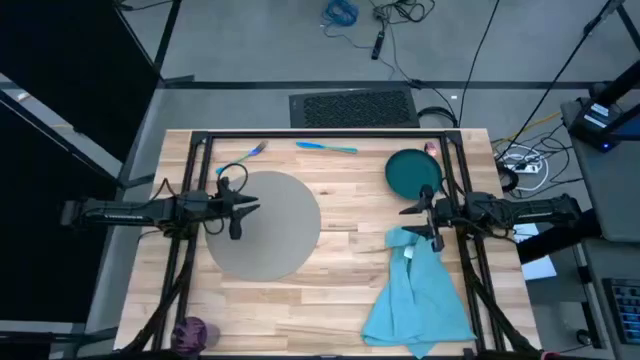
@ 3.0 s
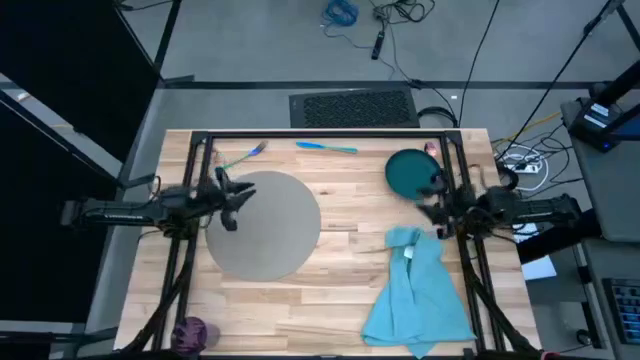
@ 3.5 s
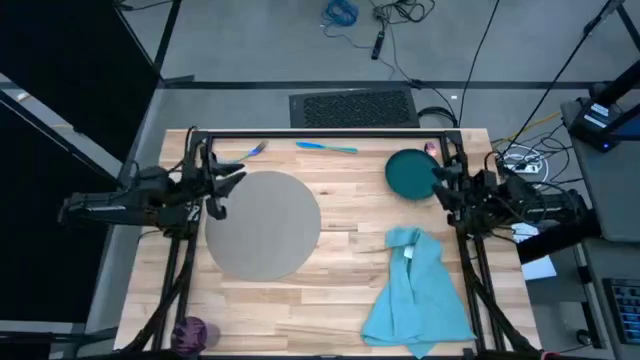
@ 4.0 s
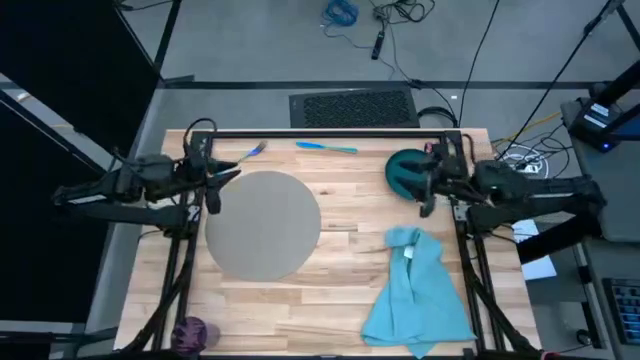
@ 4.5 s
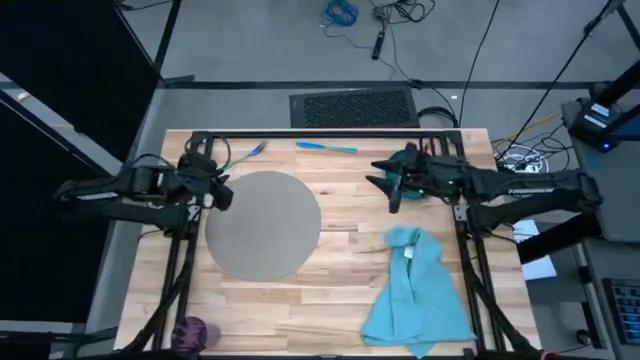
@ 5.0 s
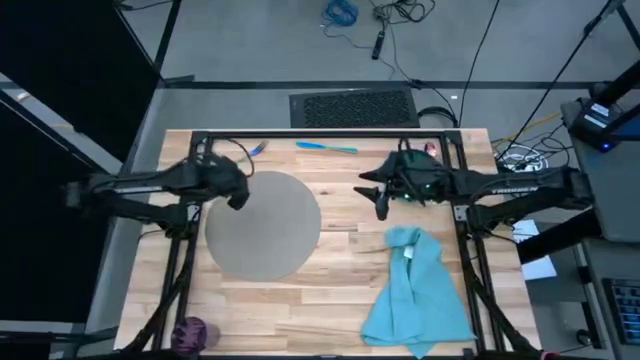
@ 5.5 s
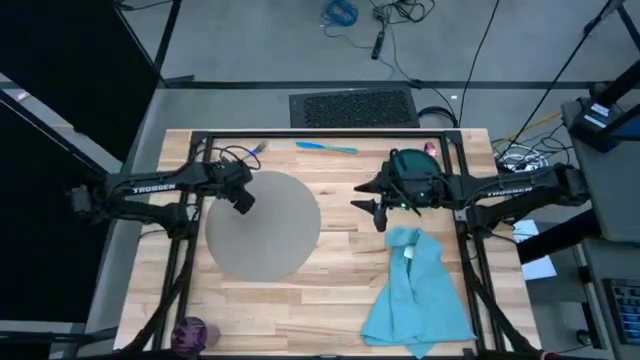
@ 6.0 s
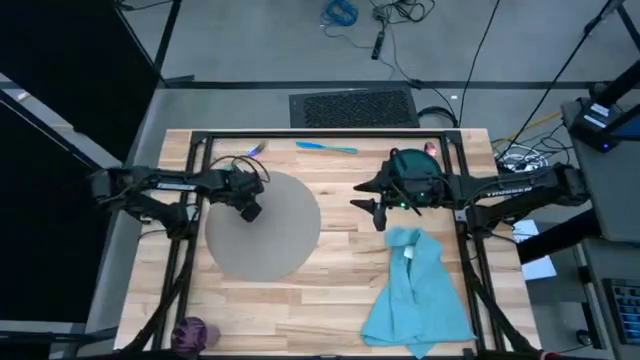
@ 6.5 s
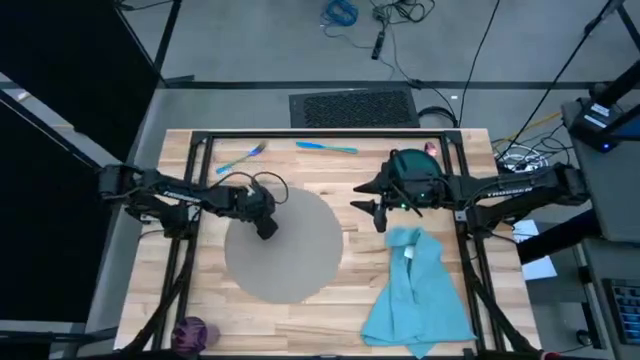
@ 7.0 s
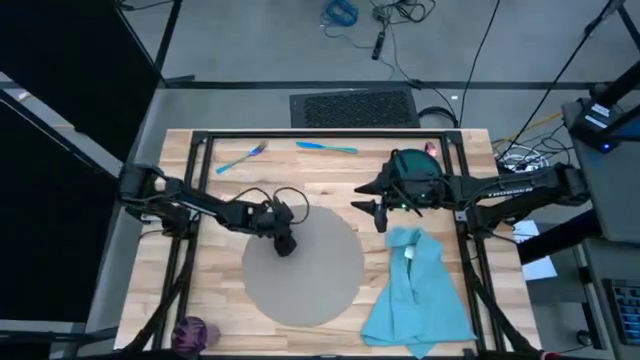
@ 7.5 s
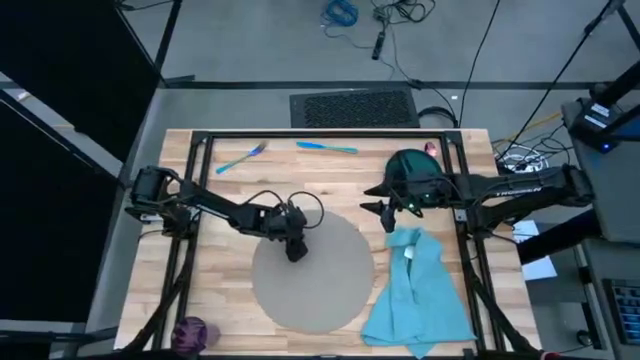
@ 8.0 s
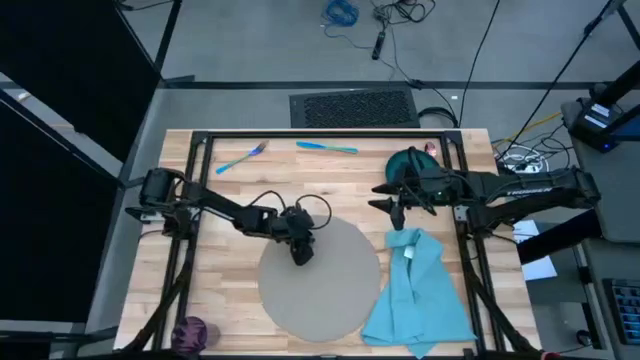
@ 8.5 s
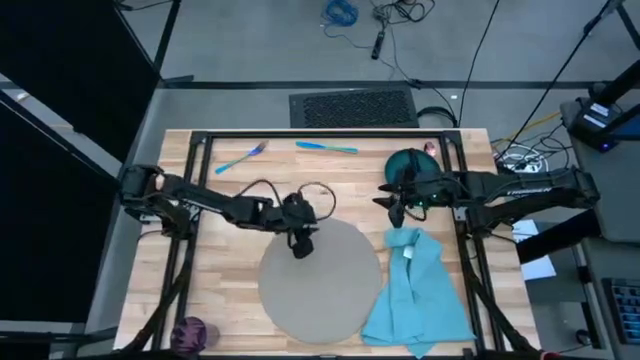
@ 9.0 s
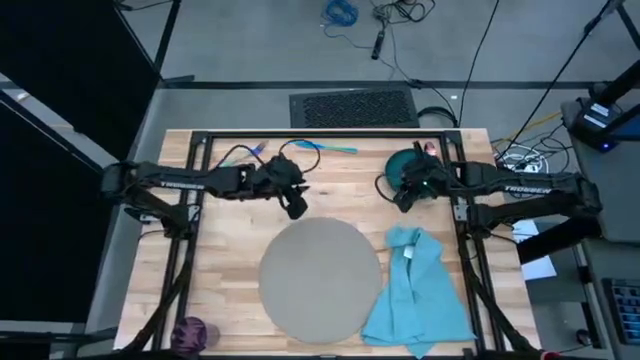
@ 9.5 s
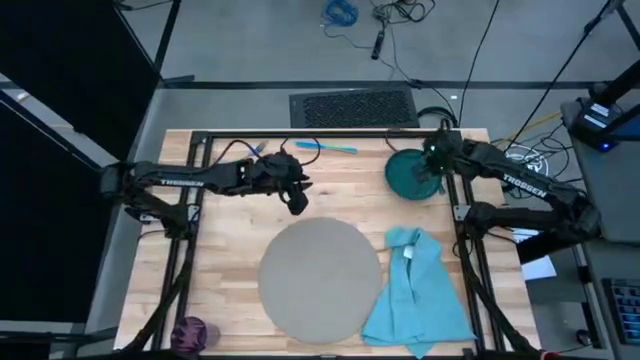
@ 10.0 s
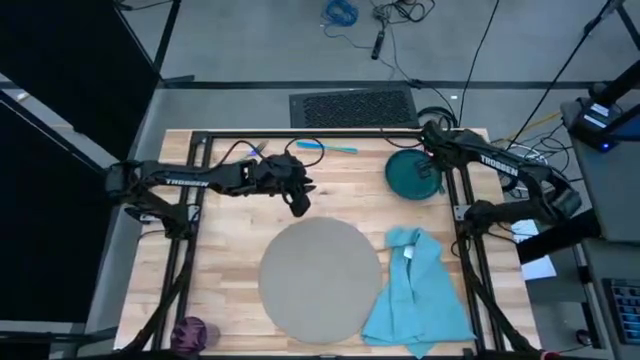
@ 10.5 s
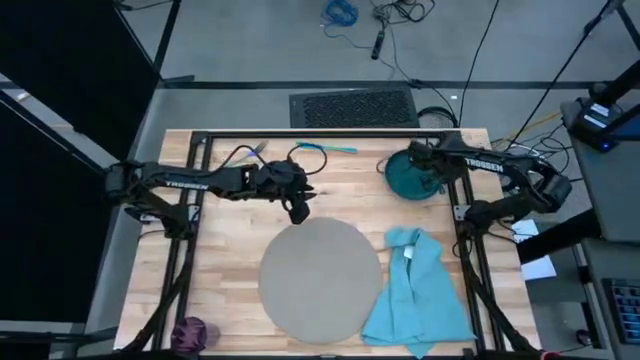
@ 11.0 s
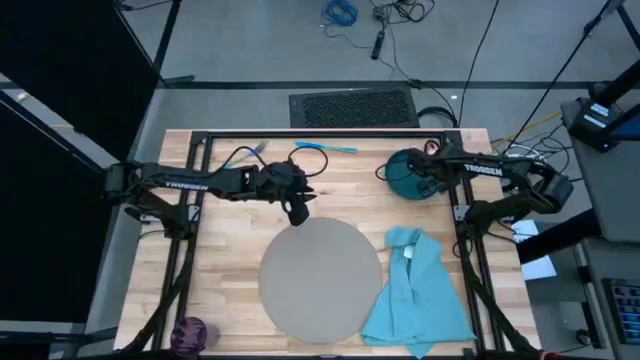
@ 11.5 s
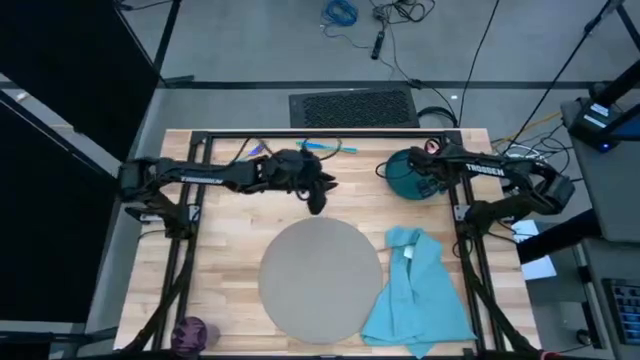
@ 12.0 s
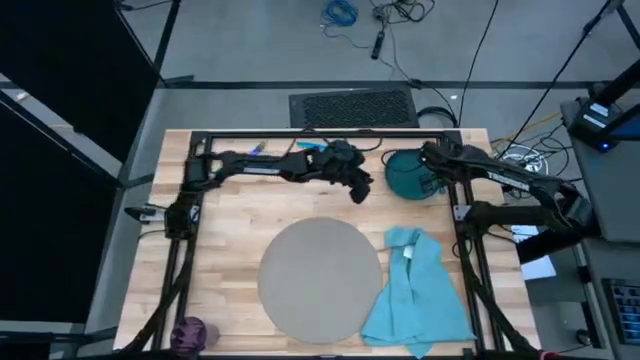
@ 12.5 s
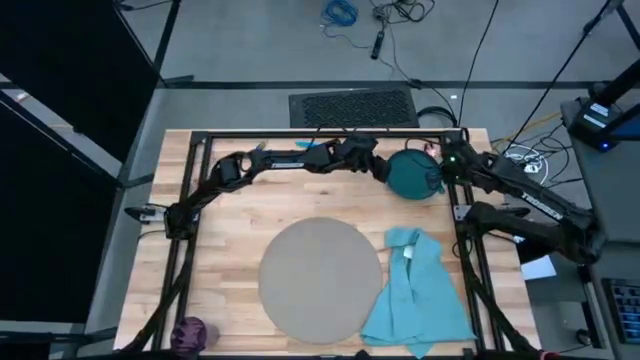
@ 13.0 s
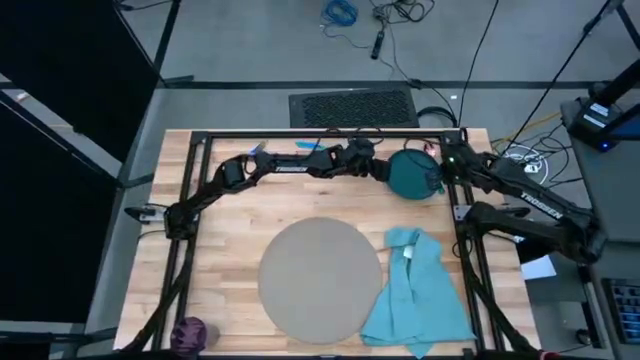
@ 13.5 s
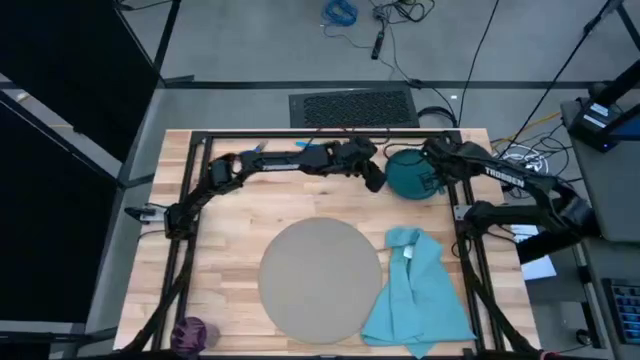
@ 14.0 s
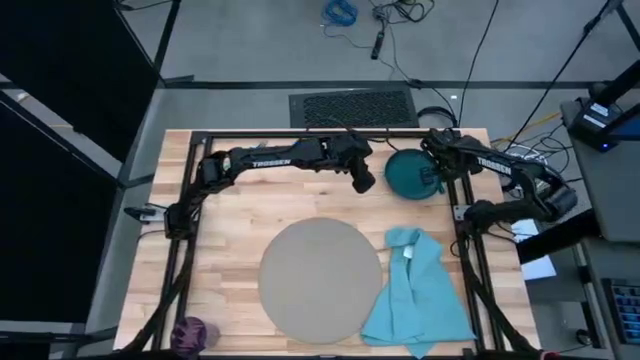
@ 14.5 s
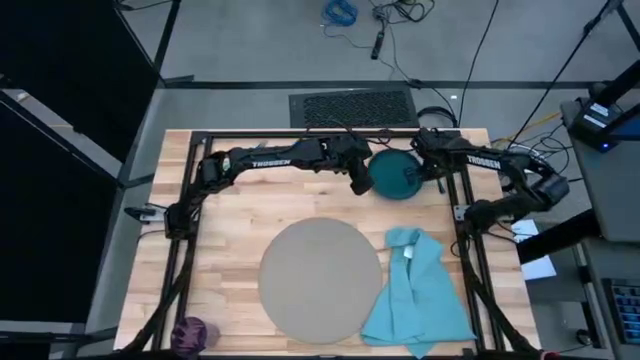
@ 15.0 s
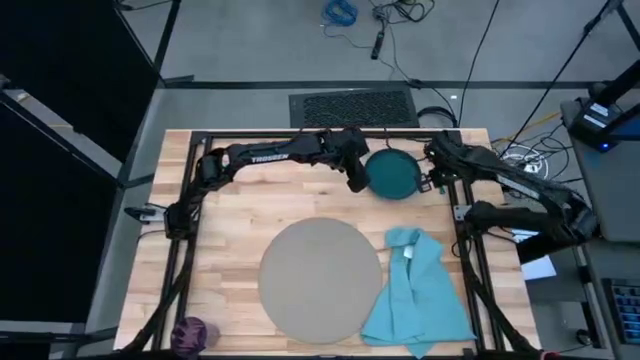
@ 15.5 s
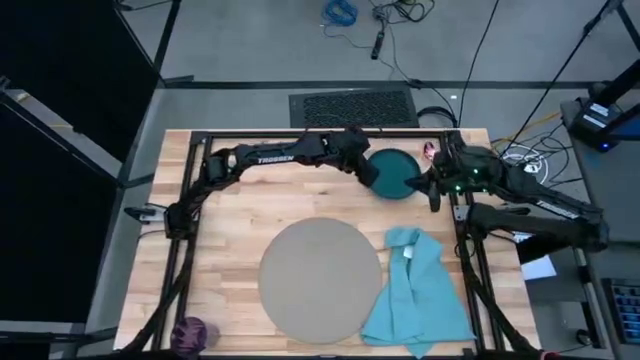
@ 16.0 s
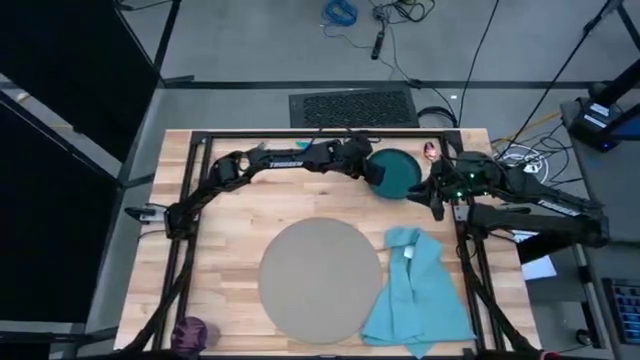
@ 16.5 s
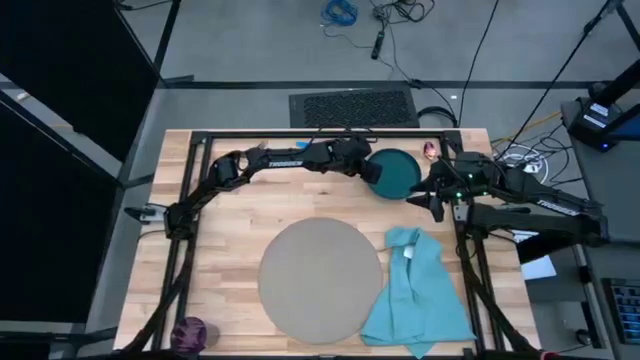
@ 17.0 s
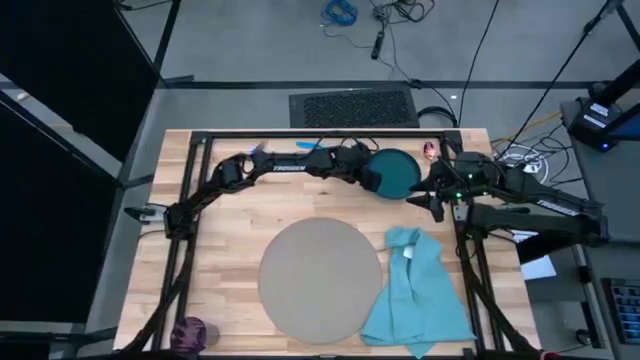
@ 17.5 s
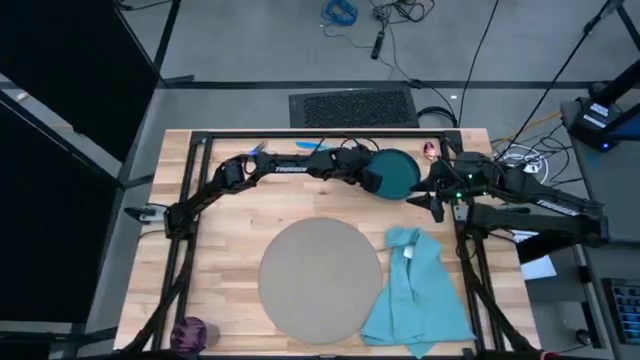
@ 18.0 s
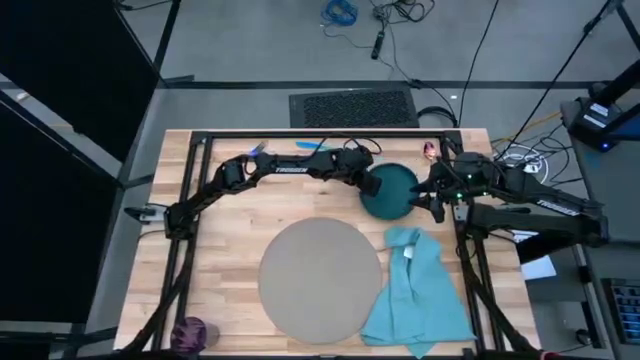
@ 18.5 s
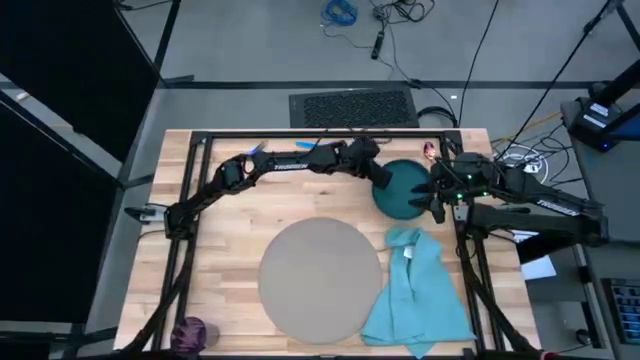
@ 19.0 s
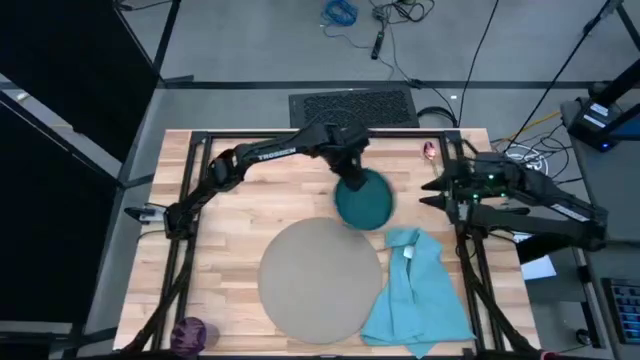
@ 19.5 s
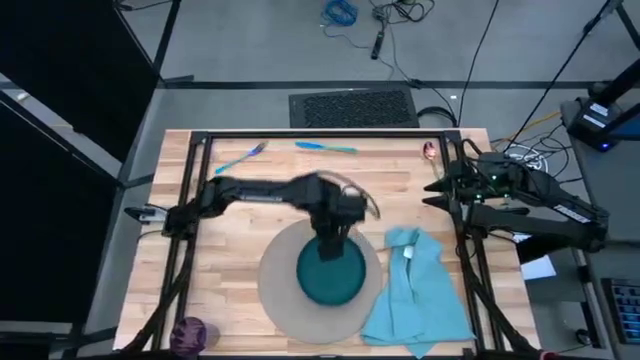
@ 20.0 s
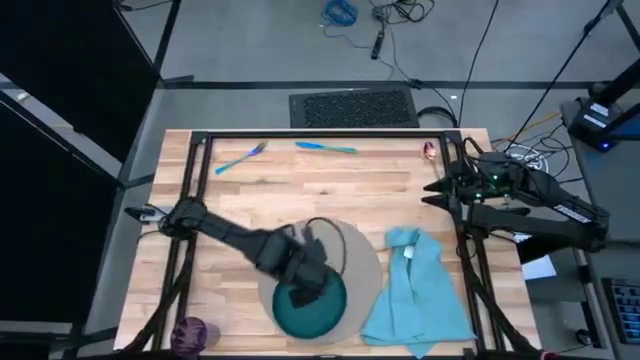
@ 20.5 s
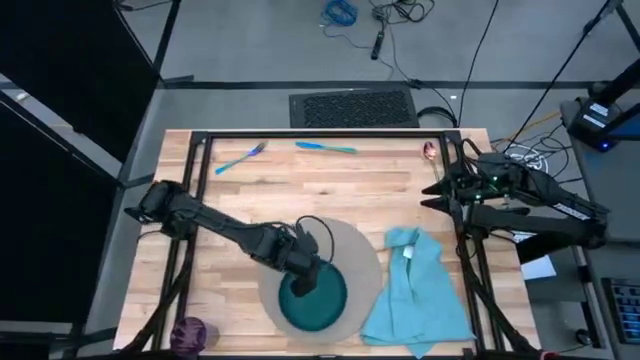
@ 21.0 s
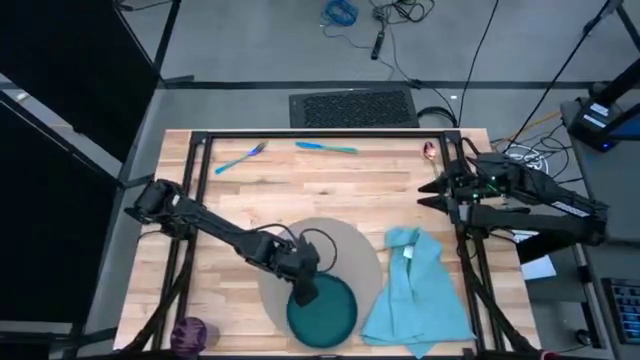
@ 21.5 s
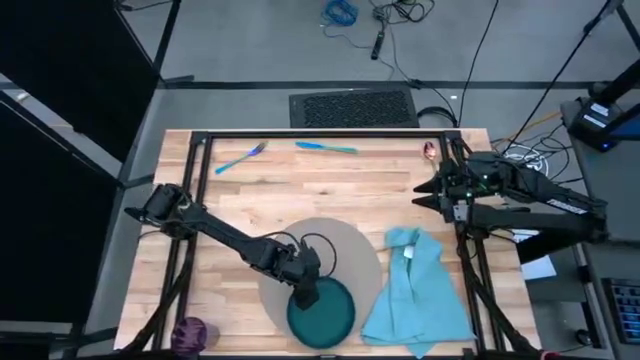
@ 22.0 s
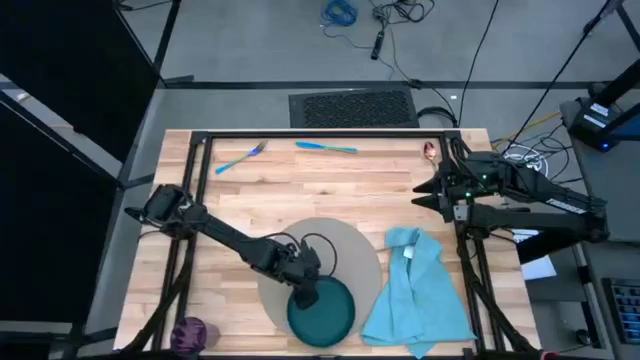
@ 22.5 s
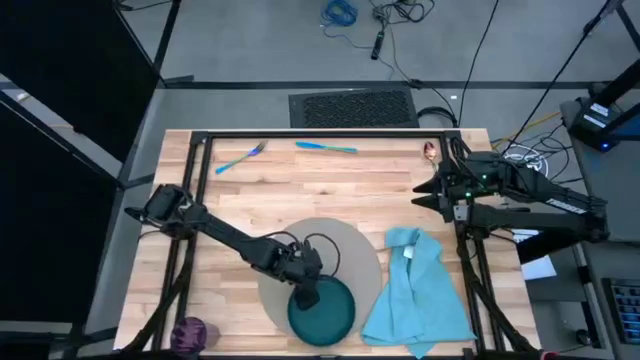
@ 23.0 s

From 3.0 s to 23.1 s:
Task: Set table place
Put the green plate on the brown table mat
